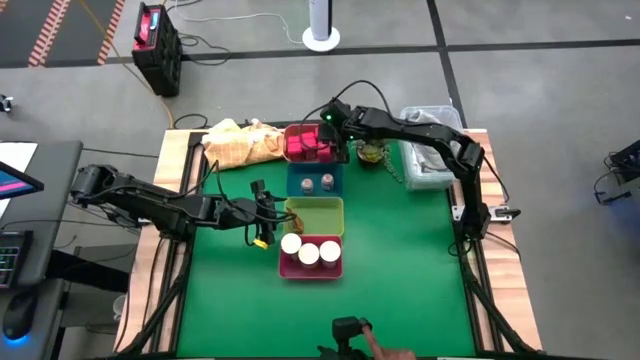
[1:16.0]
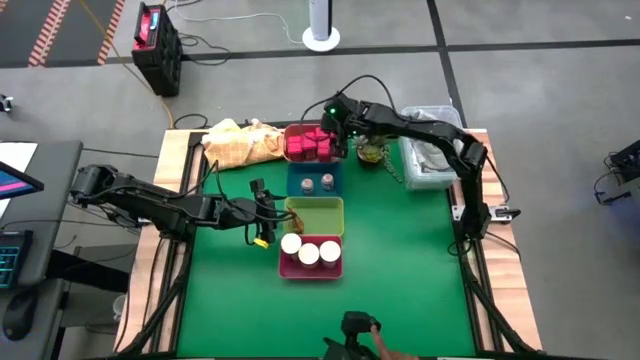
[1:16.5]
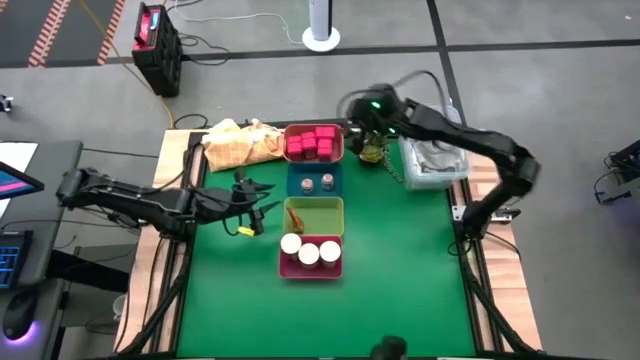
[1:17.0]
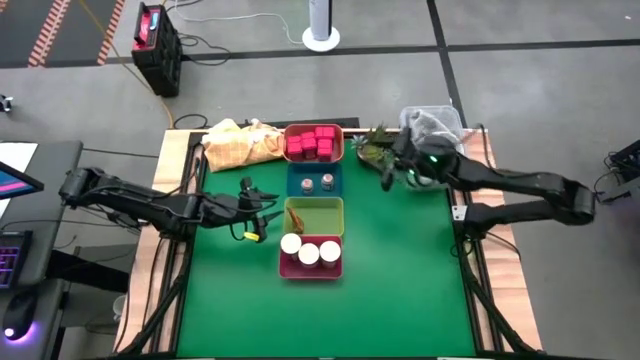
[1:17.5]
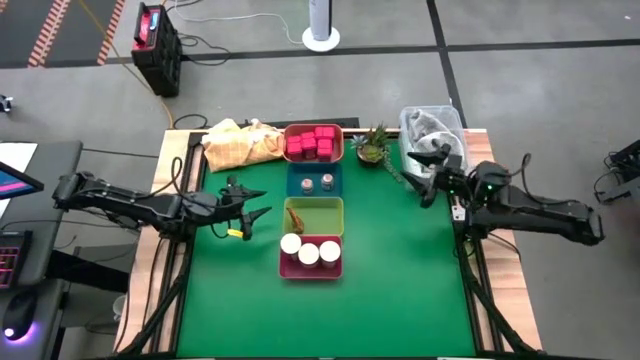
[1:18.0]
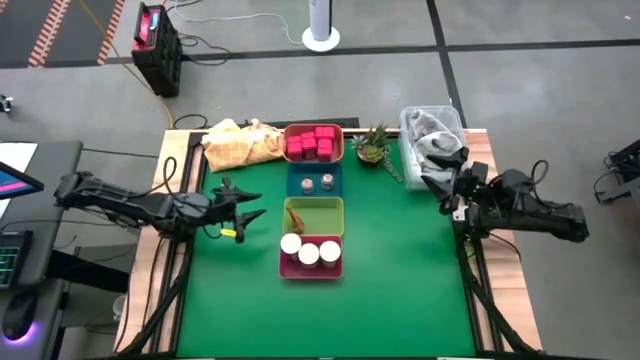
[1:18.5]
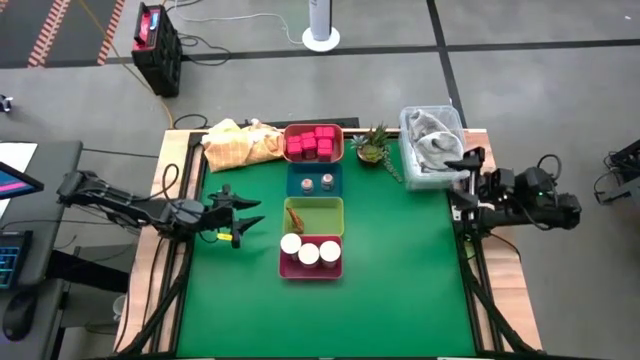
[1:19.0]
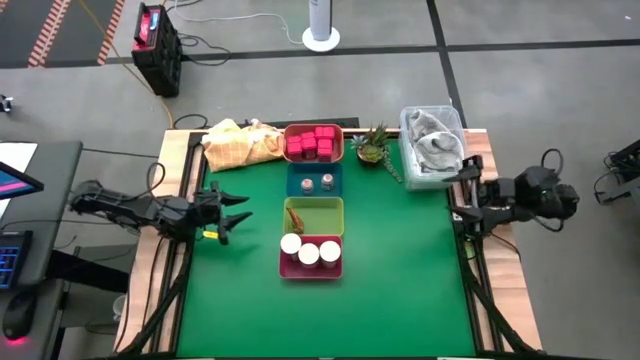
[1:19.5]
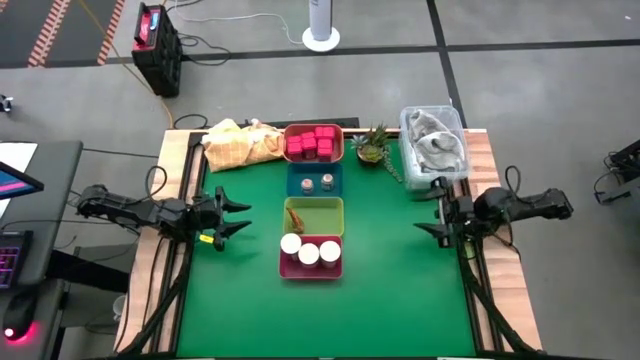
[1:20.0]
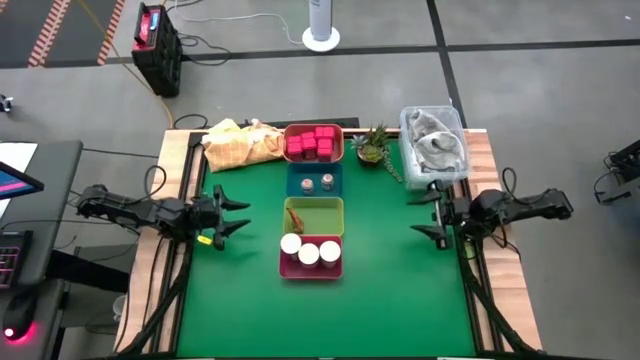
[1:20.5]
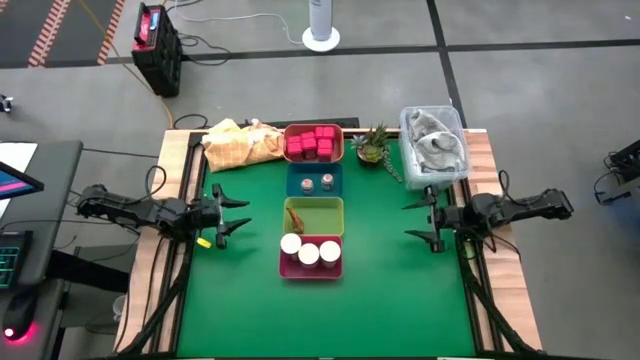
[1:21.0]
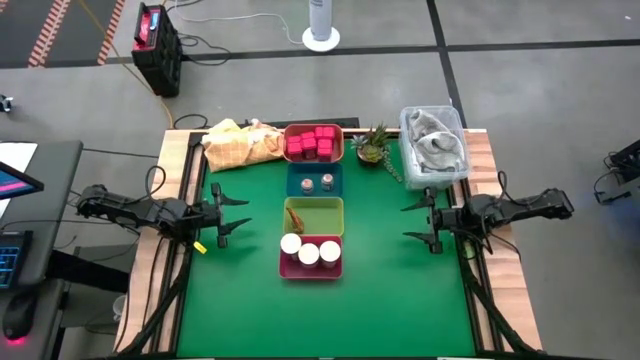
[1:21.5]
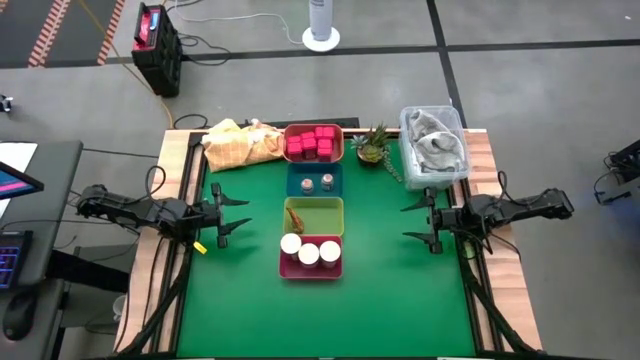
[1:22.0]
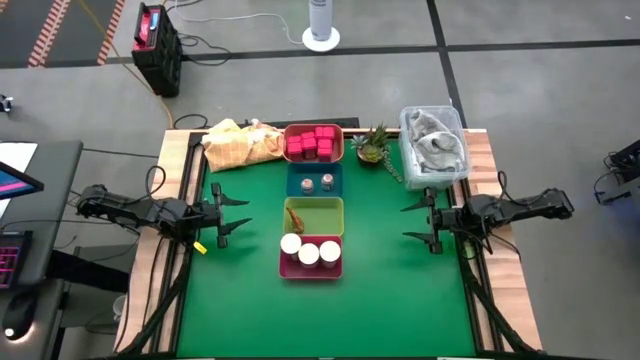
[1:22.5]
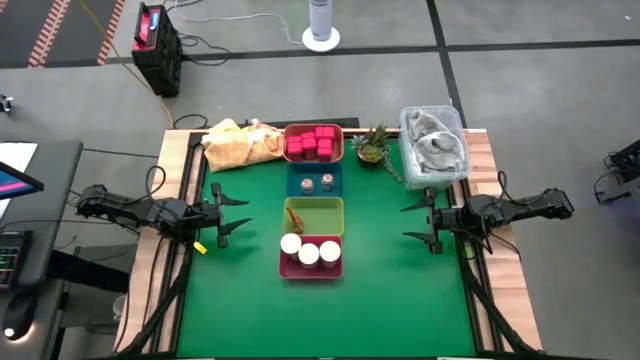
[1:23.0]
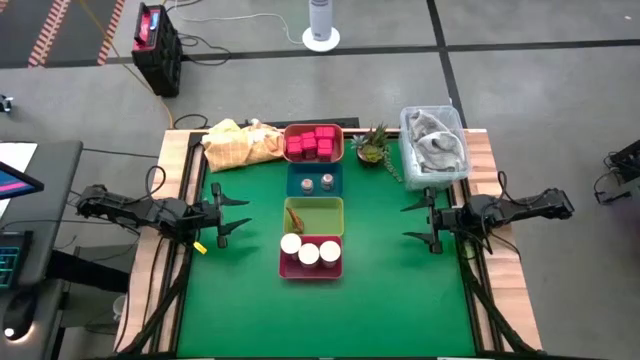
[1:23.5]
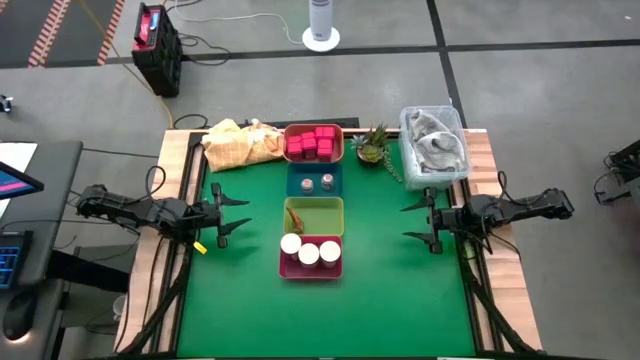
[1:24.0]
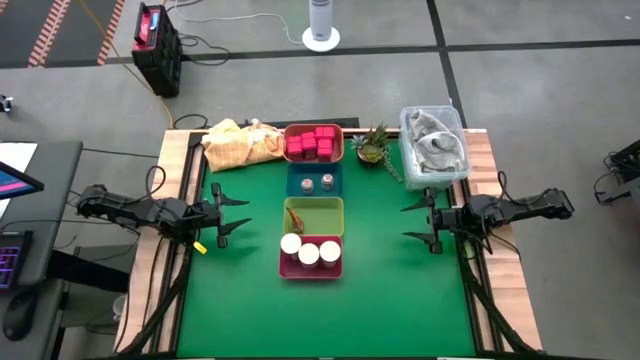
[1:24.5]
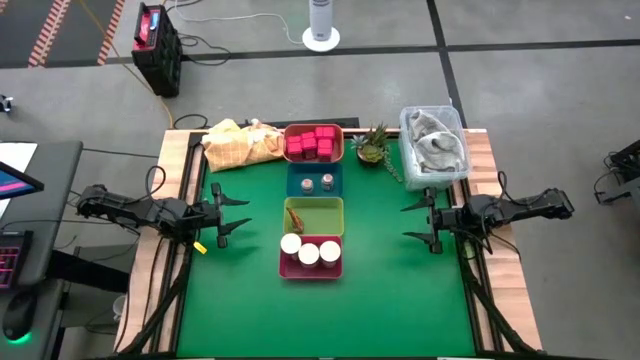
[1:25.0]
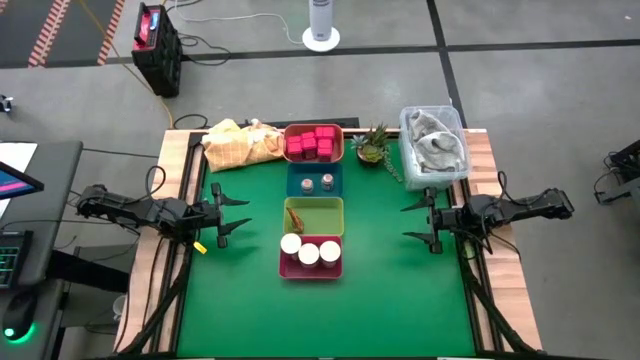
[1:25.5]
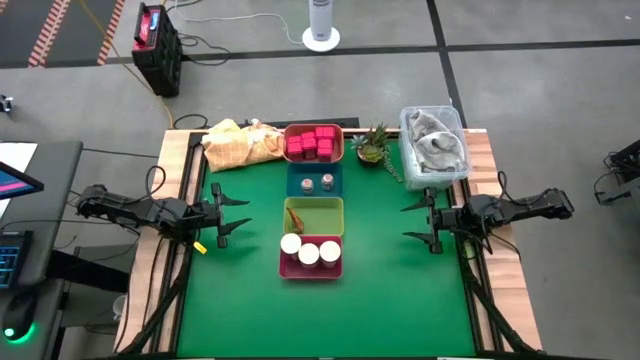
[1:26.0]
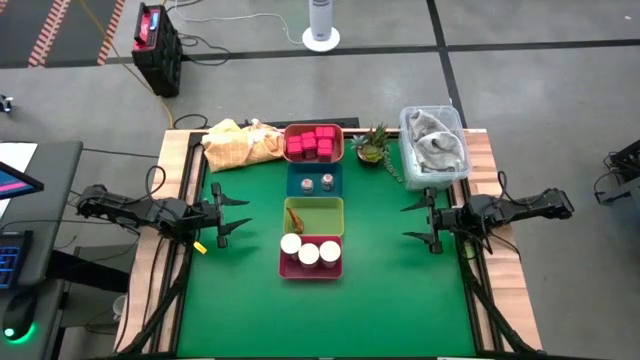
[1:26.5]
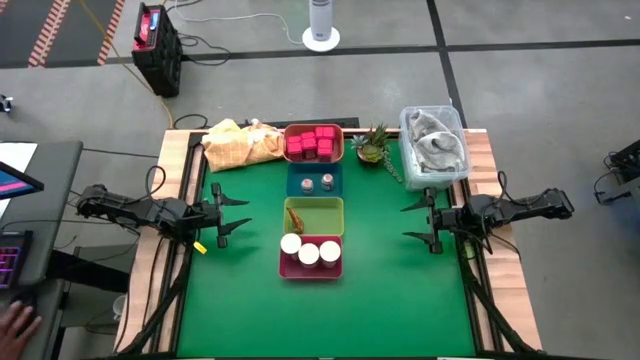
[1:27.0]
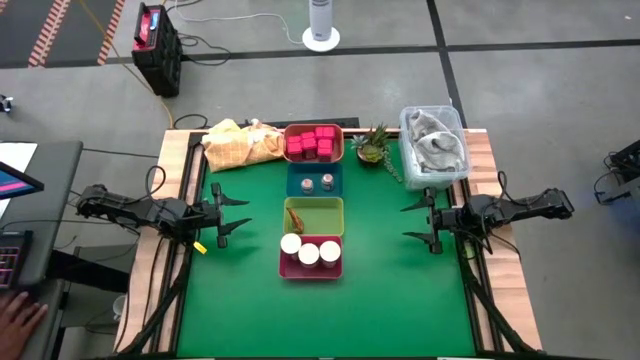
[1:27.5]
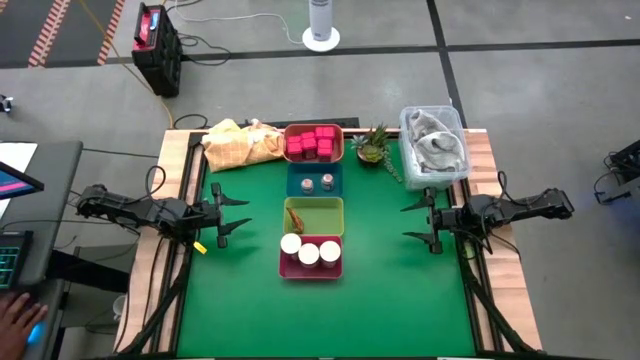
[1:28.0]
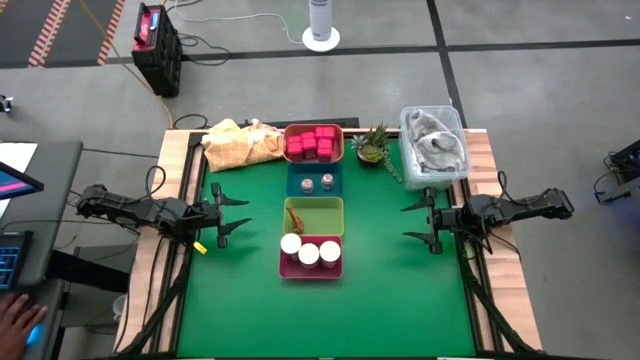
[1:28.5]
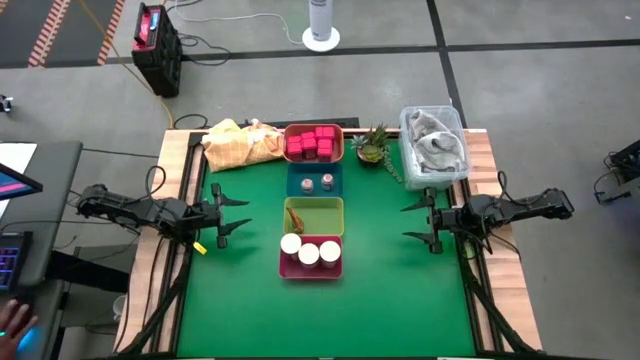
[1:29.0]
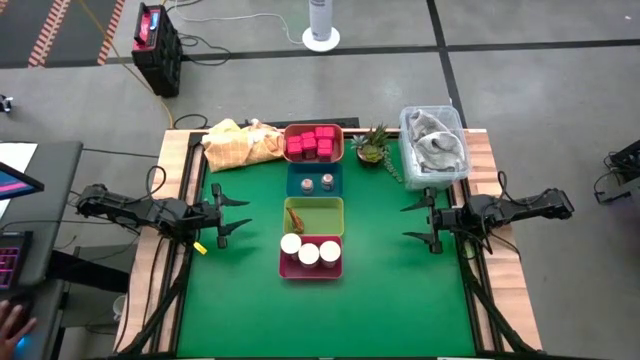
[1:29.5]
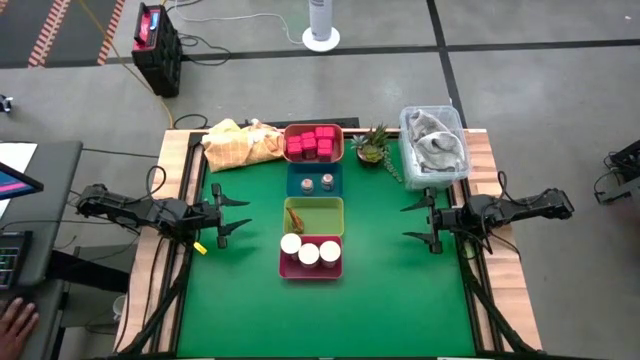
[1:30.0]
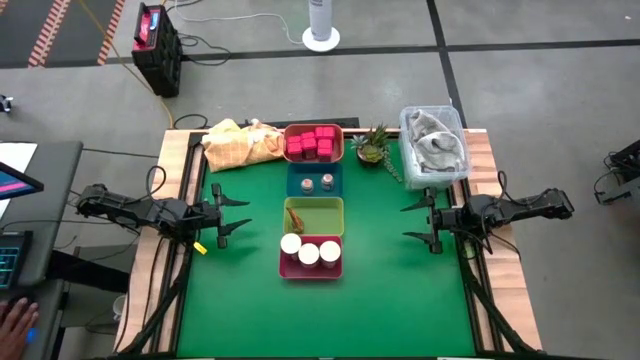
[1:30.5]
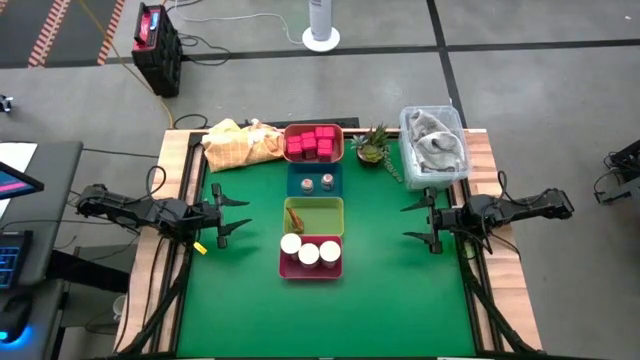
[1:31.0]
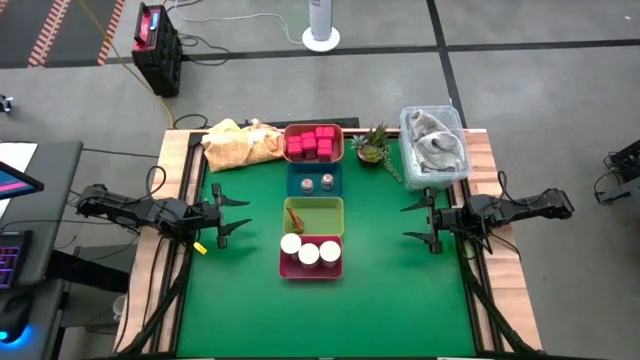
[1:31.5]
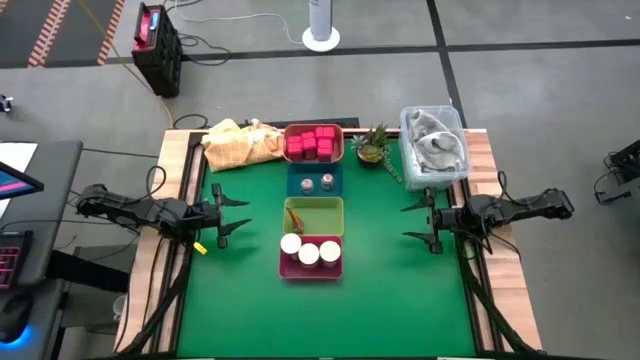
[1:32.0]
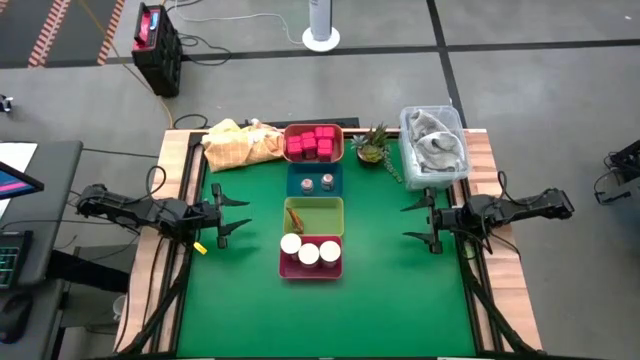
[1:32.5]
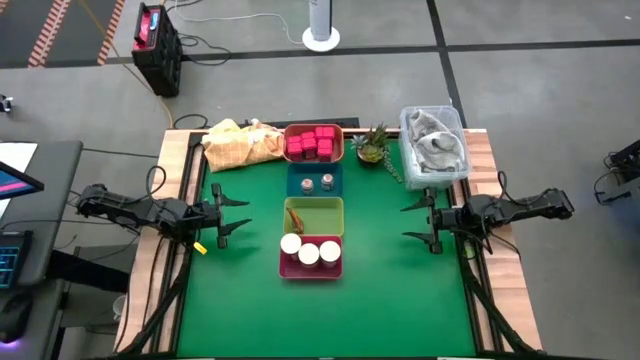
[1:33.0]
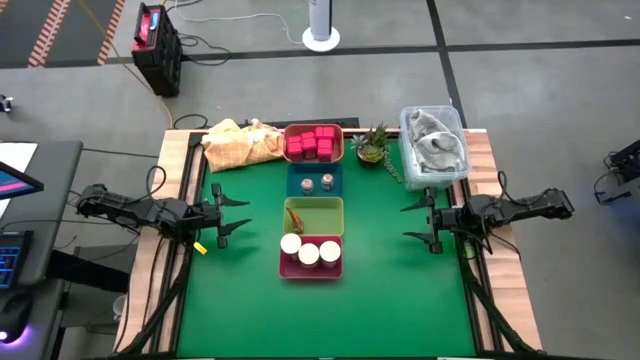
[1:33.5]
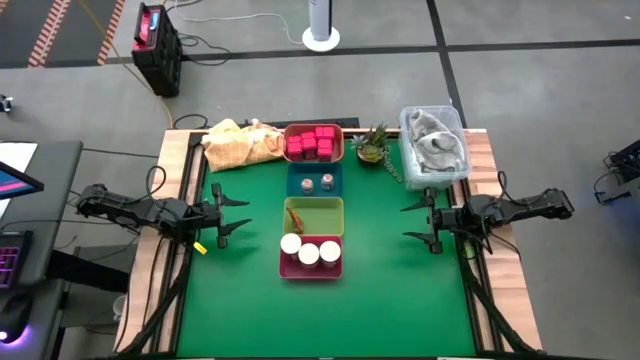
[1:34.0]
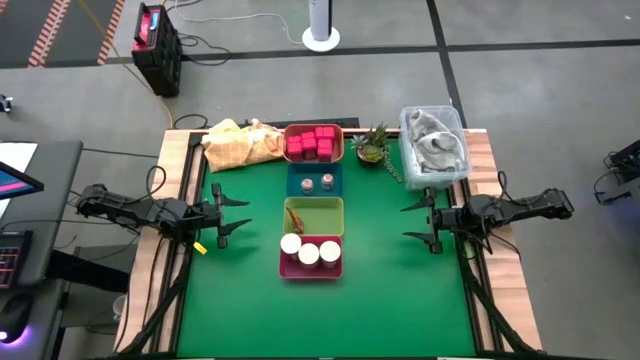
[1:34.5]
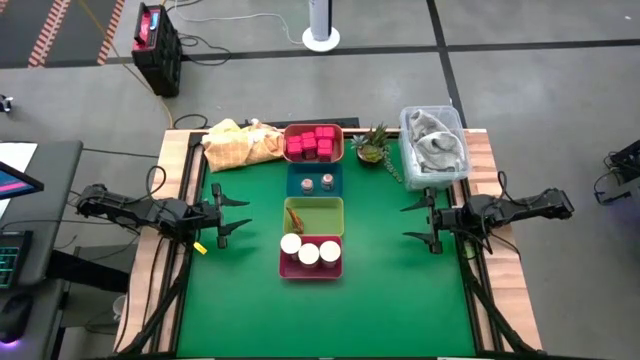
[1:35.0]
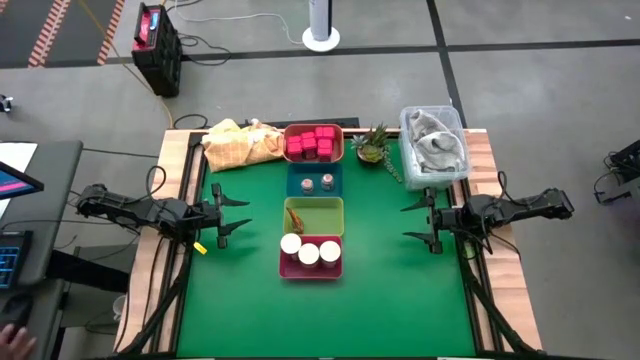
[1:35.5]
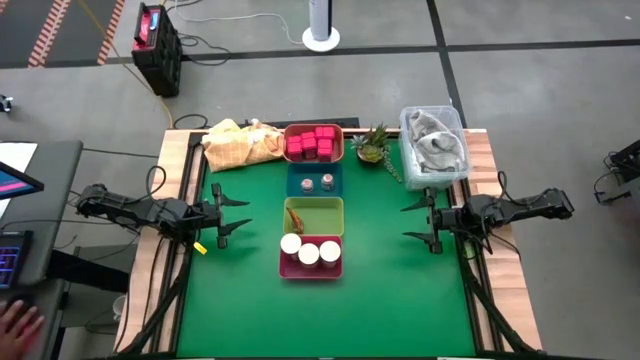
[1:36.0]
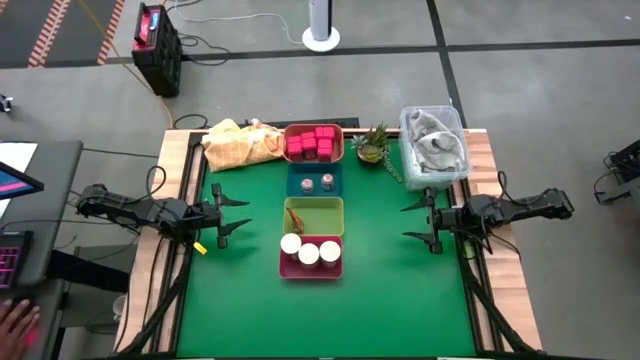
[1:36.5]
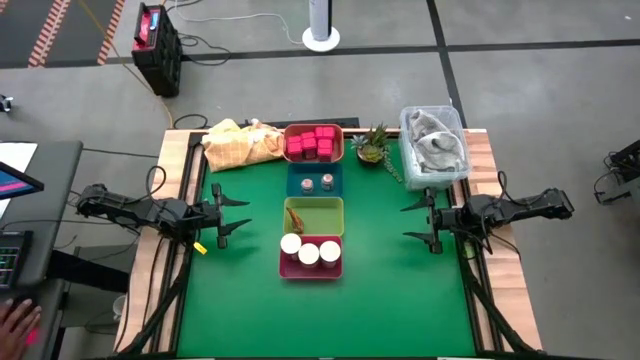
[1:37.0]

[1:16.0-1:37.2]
Task: Sort spices by type
Return to Home Position
